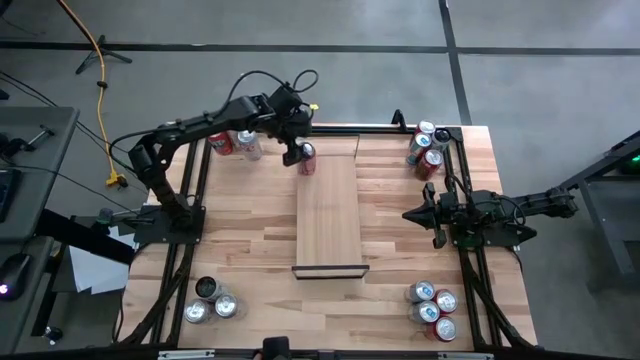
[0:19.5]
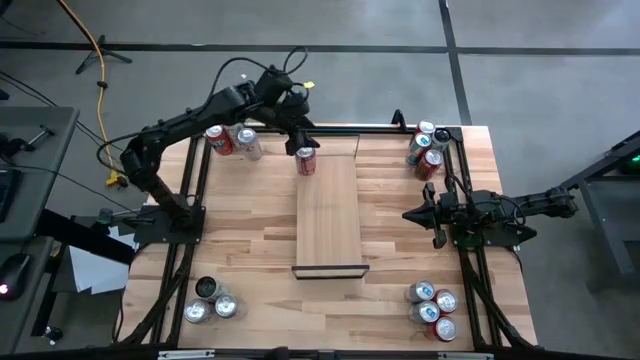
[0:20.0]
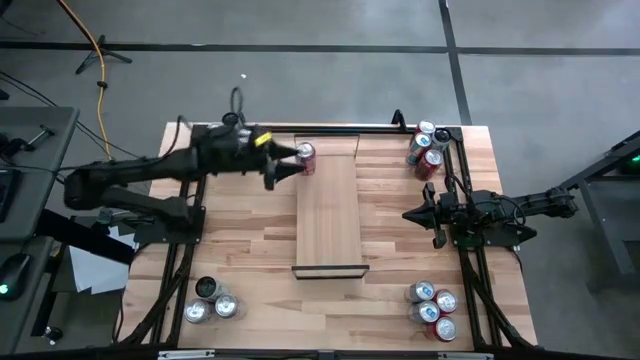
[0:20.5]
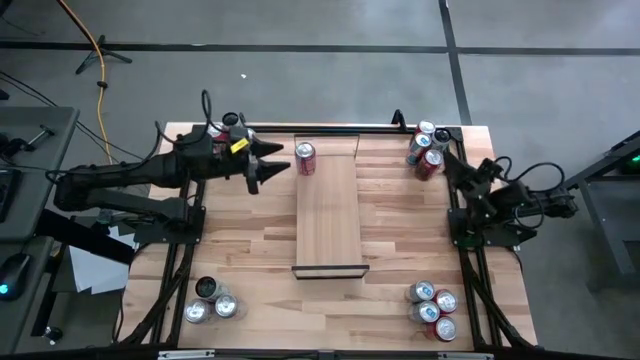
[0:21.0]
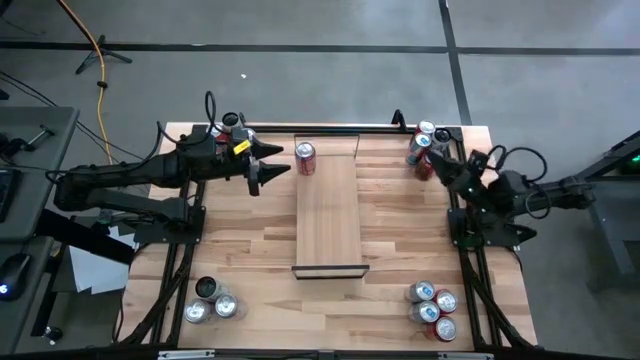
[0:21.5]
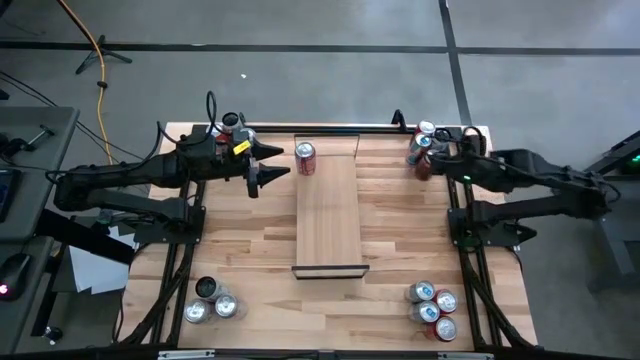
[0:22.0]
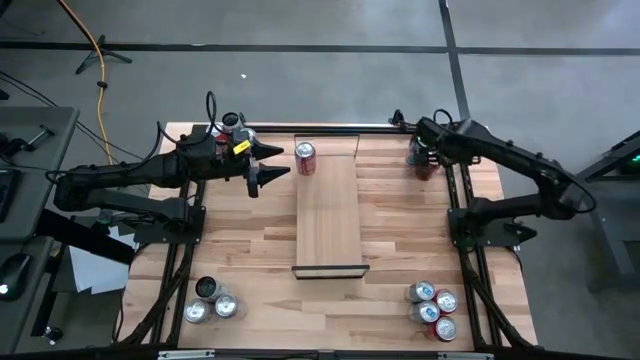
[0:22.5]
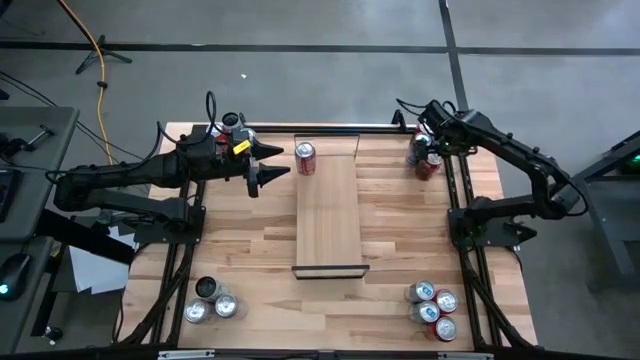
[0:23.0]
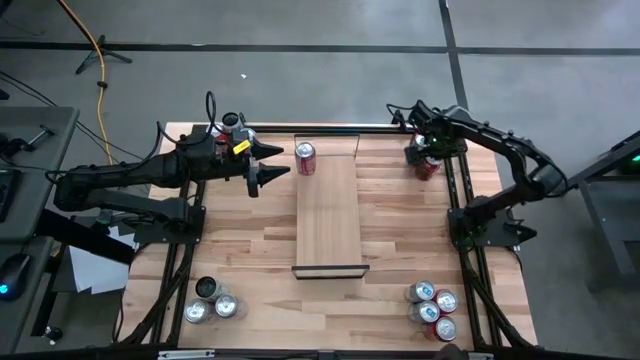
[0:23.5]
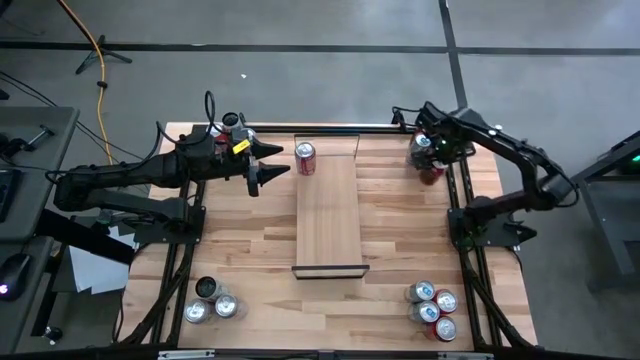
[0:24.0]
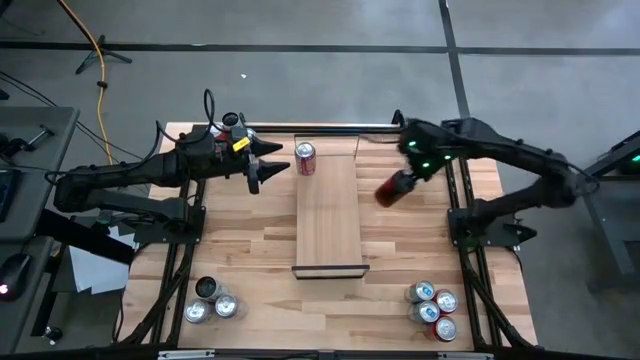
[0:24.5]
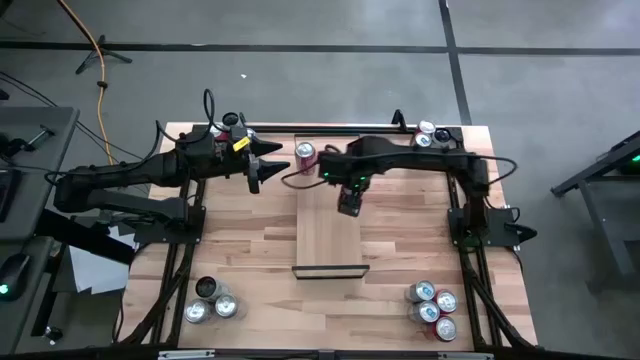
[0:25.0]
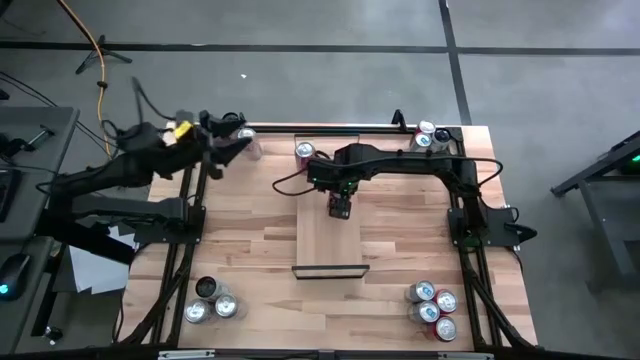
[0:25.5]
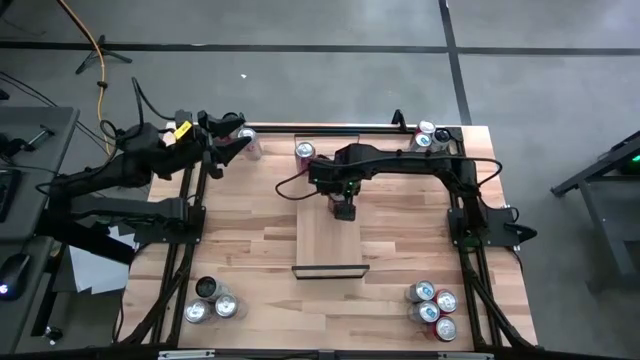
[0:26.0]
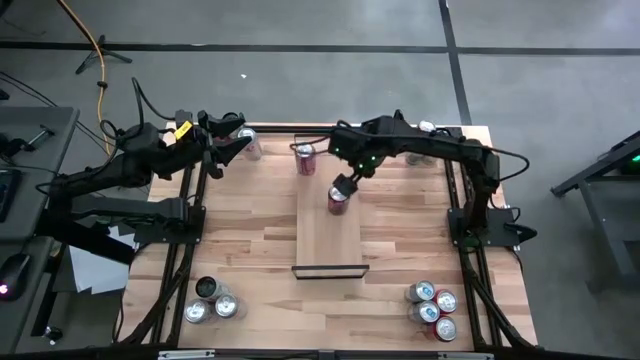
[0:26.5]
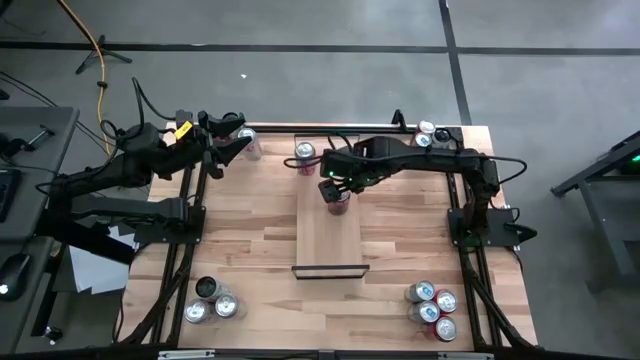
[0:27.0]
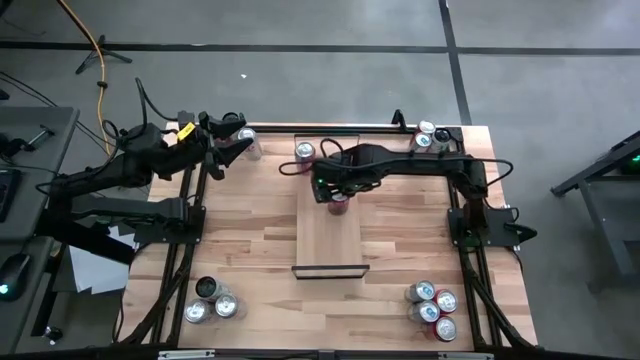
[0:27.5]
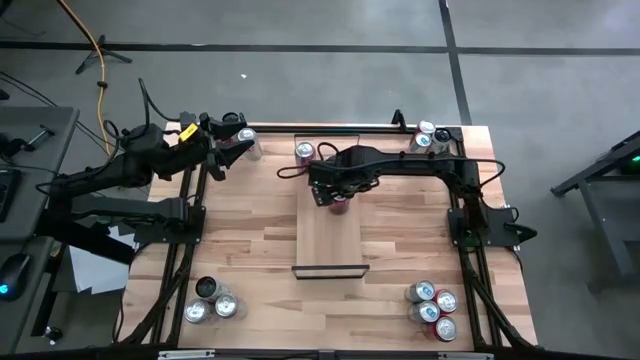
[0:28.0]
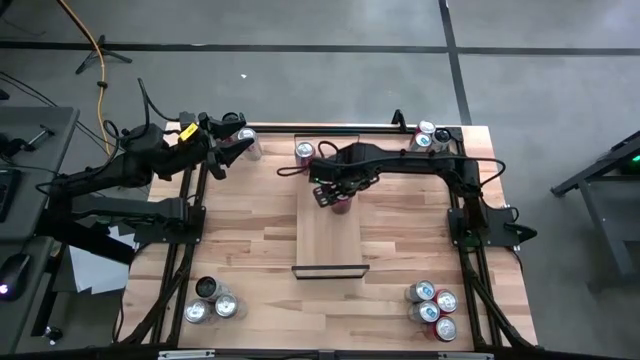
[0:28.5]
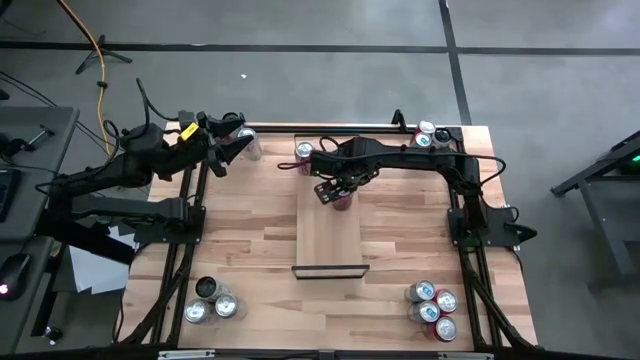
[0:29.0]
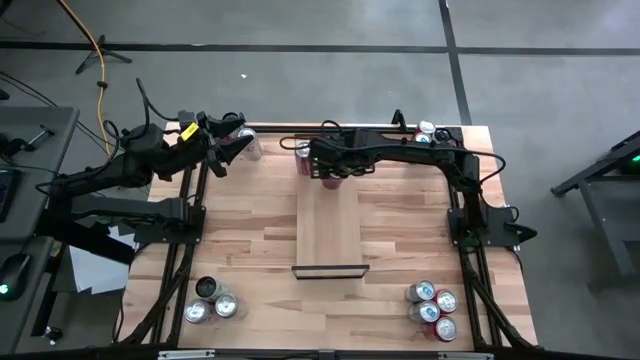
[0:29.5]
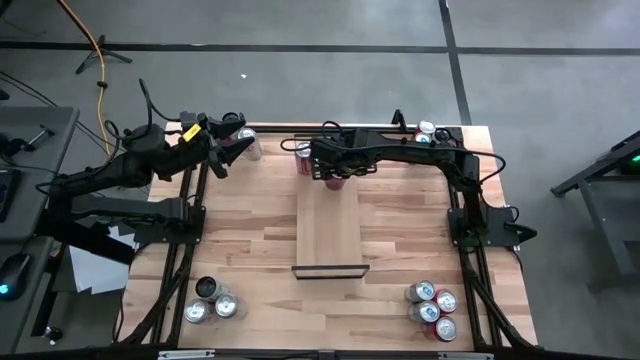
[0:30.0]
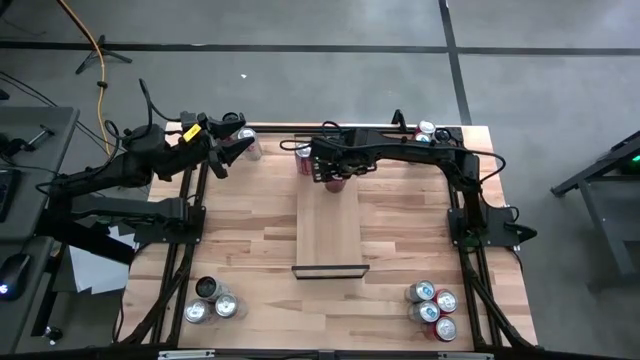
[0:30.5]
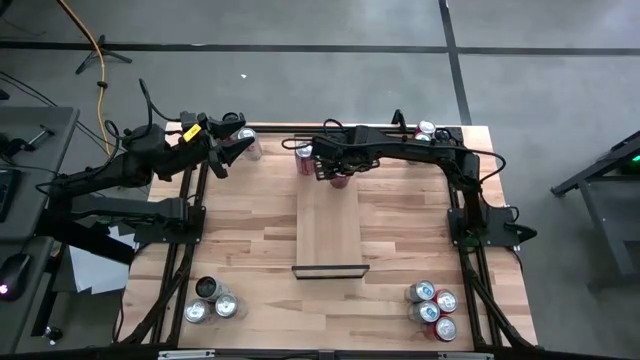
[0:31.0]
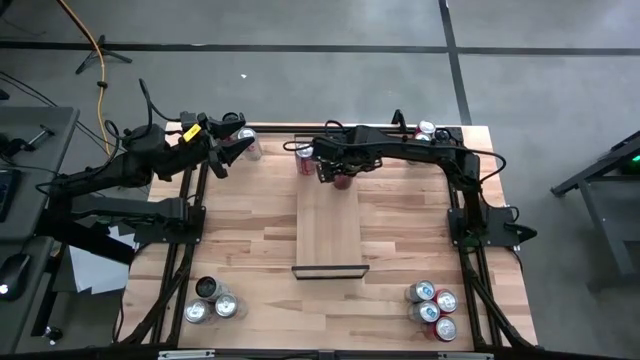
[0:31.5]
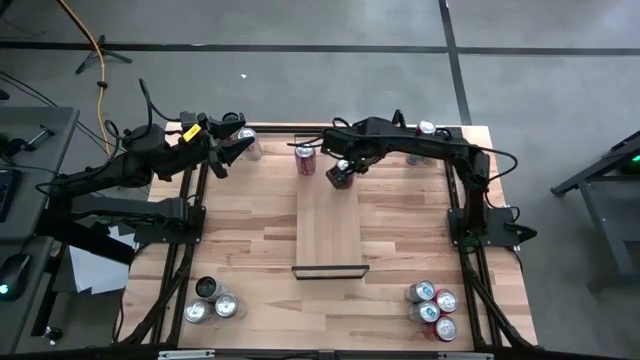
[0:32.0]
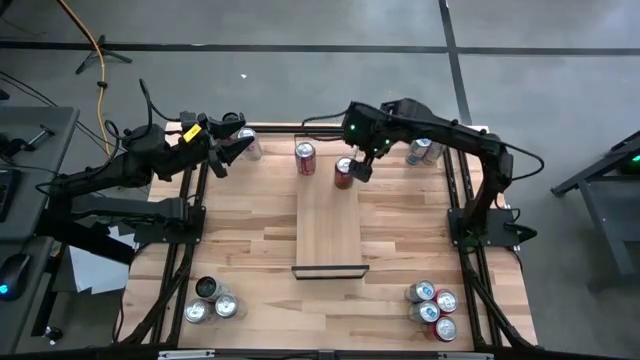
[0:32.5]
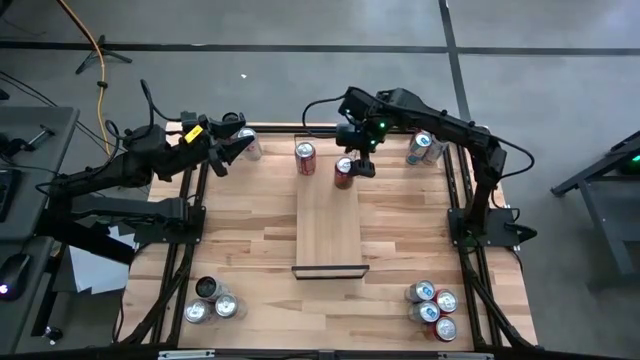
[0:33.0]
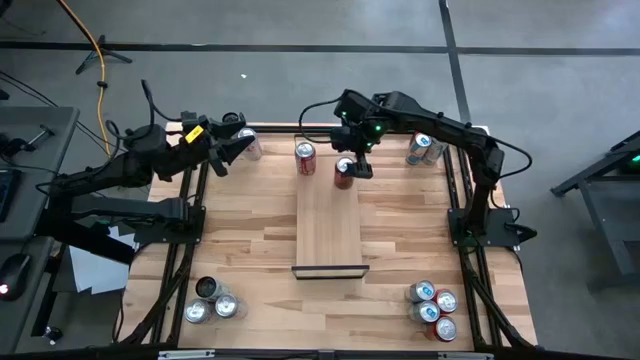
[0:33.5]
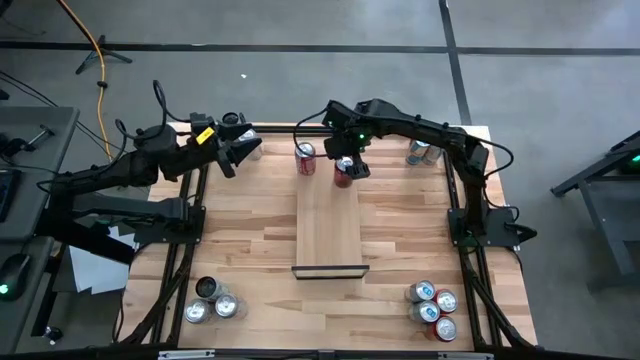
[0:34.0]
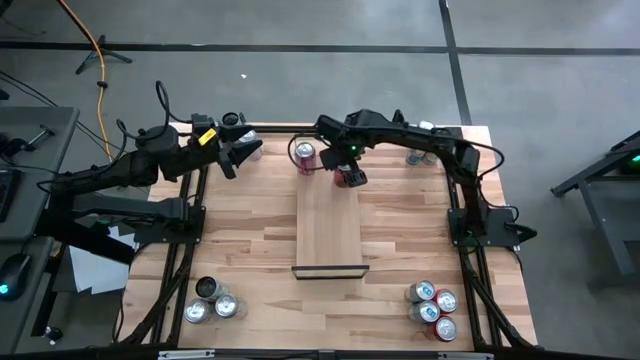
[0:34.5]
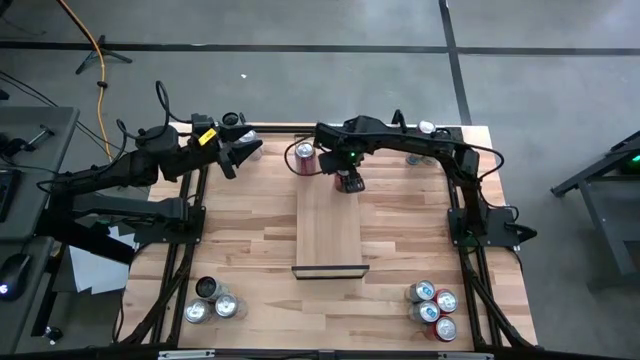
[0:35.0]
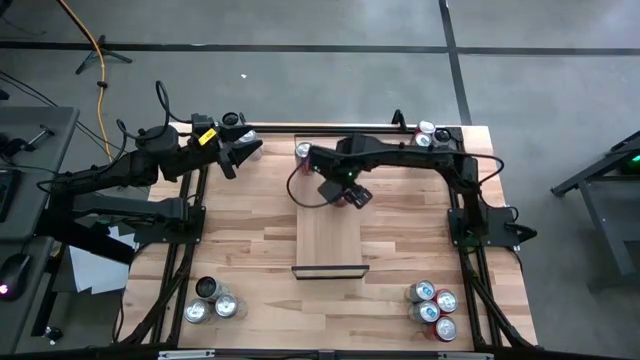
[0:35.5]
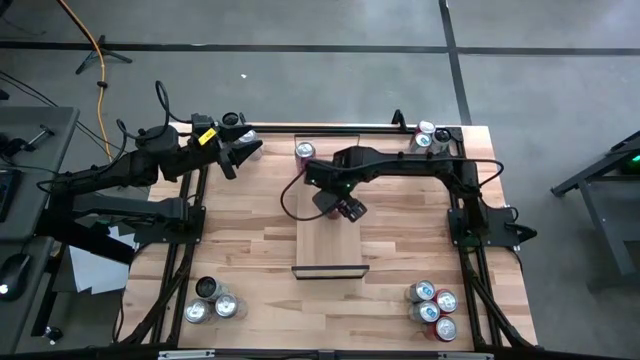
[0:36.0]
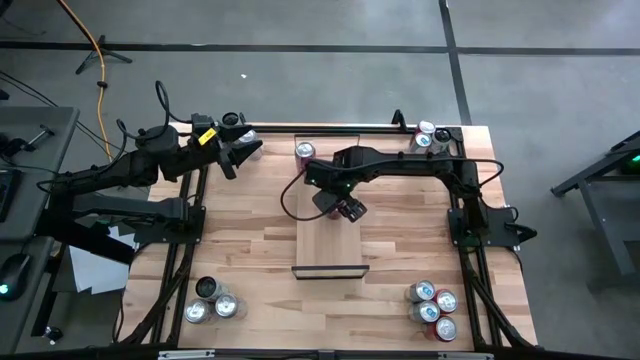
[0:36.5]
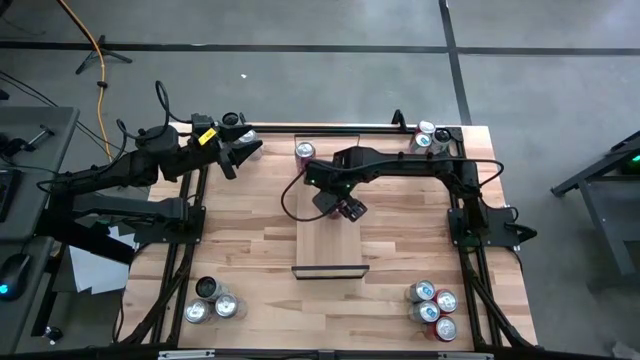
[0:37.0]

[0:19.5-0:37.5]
Task: Place canned beverage on shelf
Put the red soda can on the shelf aligned with the other red soda can

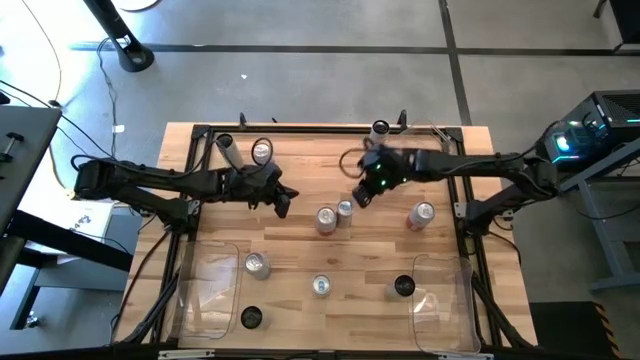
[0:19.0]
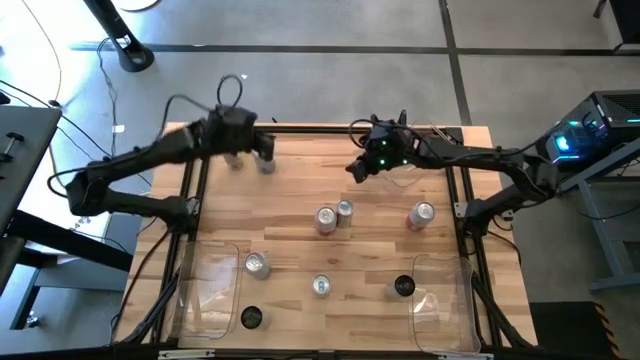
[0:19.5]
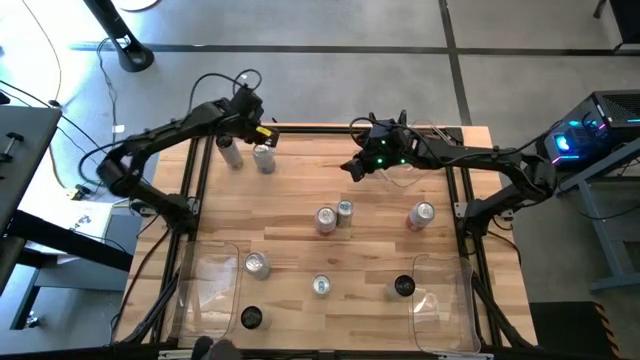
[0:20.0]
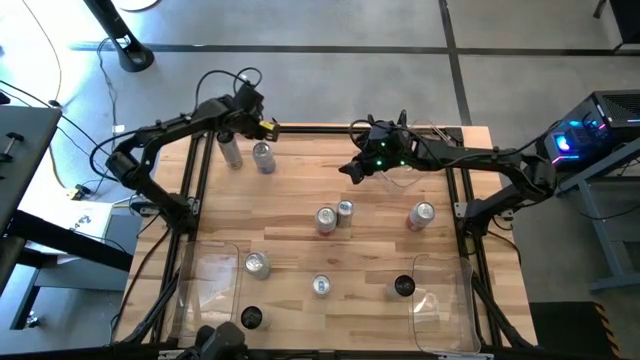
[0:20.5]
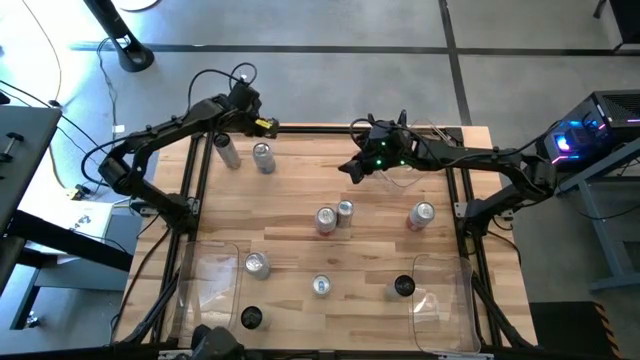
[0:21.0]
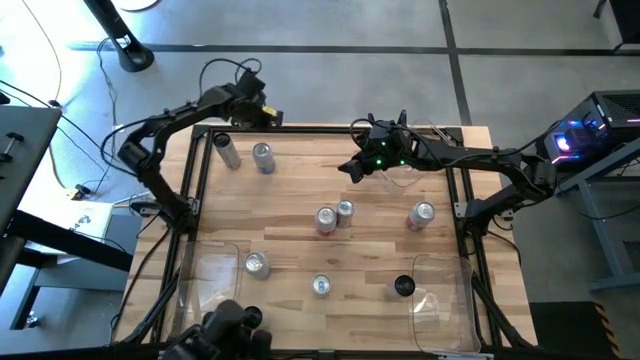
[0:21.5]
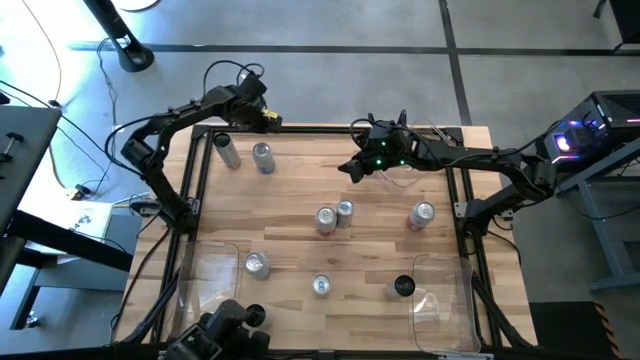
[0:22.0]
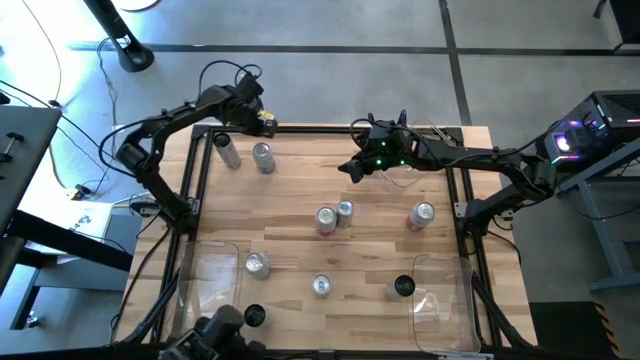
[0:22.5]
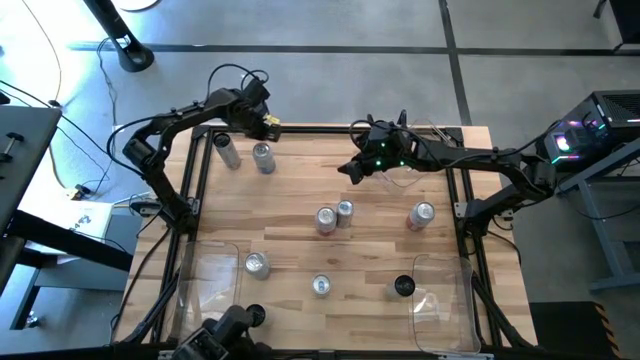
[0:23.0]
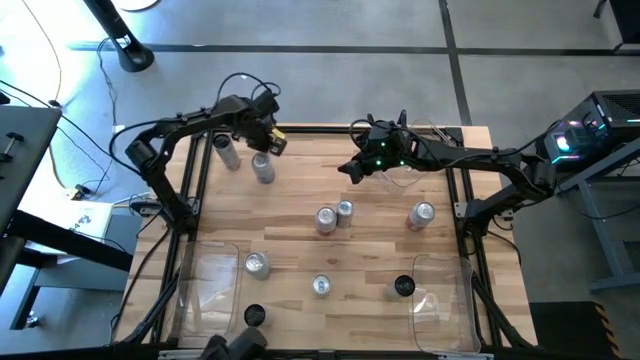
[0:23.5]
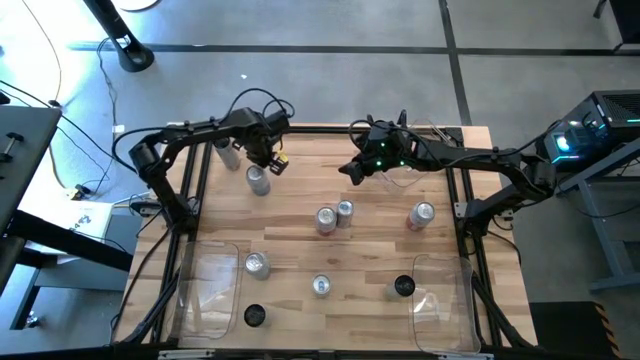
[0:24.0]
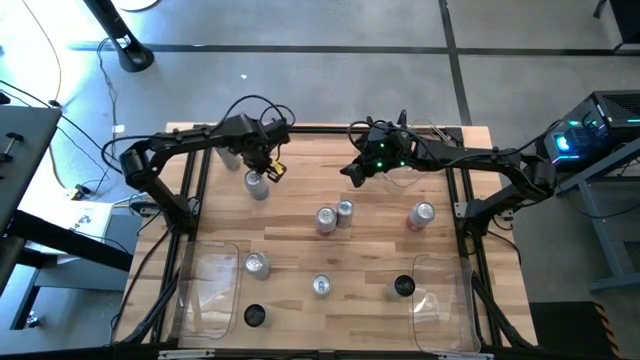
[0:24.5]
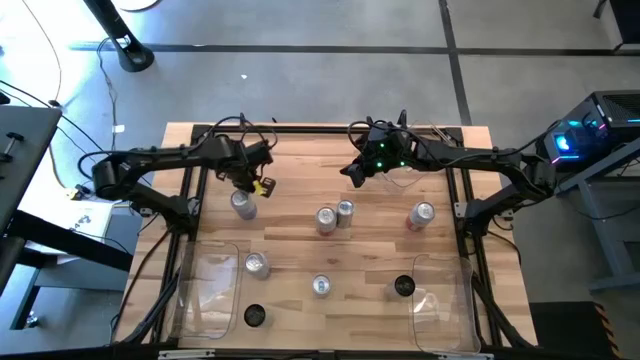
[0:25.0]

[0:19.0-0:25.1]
Task: Sort soda cans
Move the top blue-white soda can to the middle left of the table
